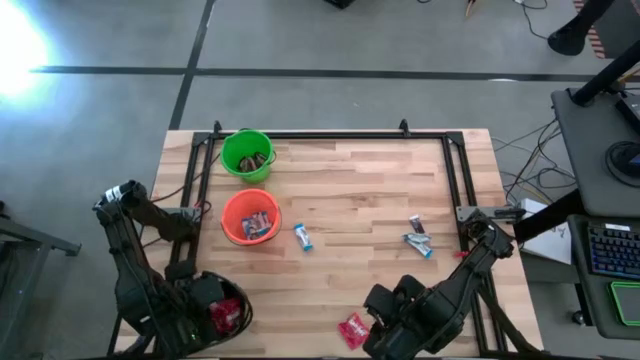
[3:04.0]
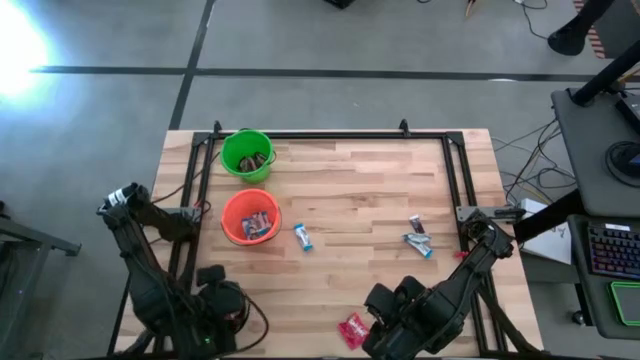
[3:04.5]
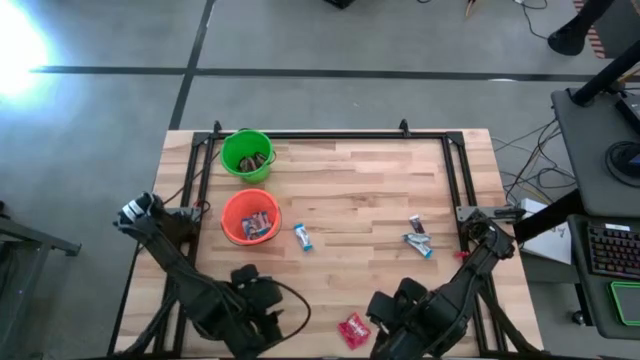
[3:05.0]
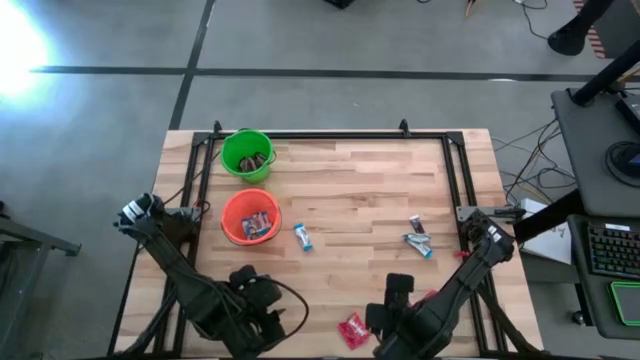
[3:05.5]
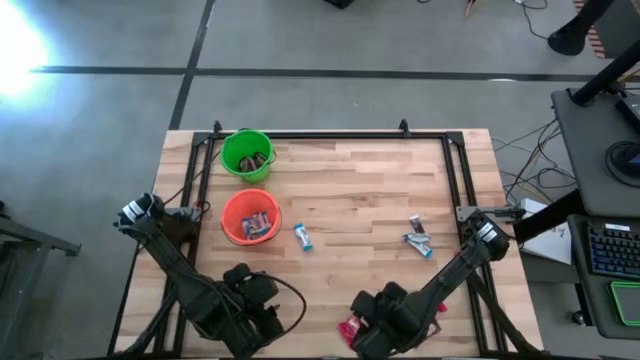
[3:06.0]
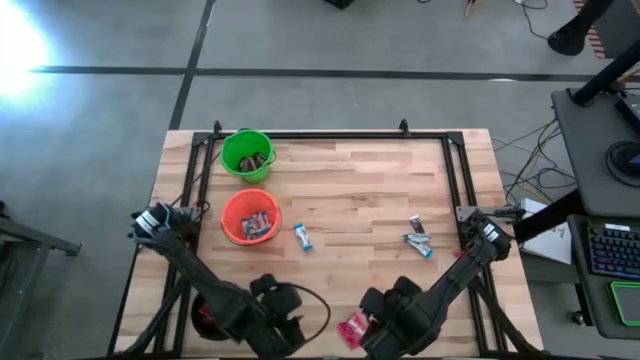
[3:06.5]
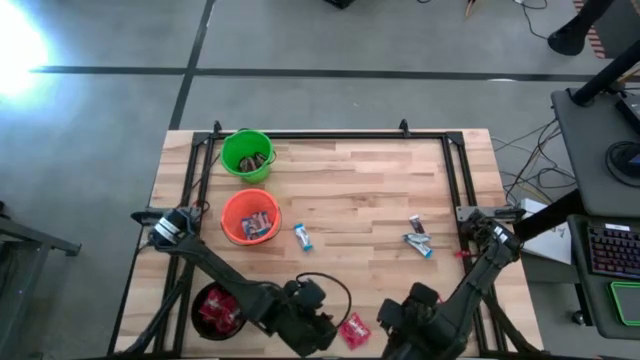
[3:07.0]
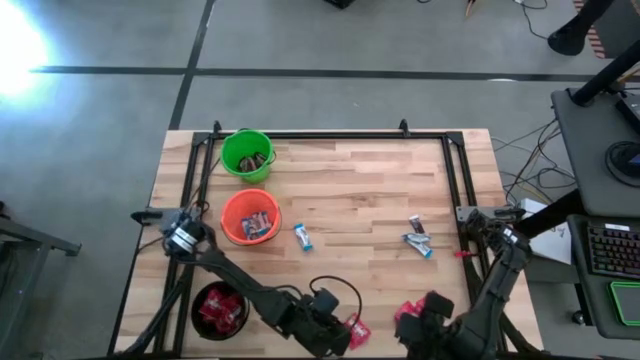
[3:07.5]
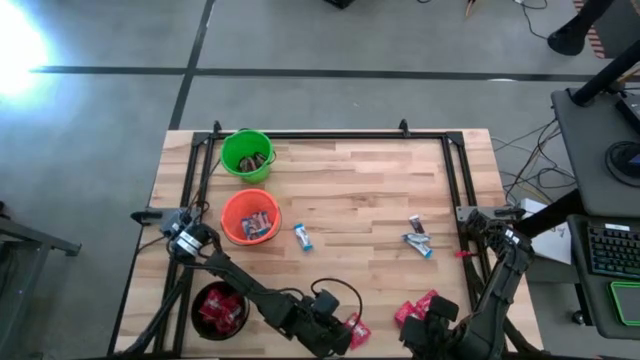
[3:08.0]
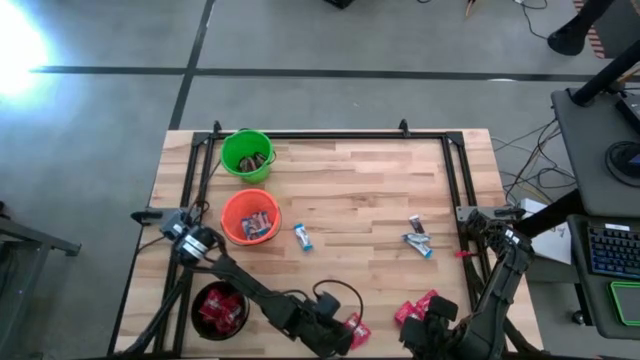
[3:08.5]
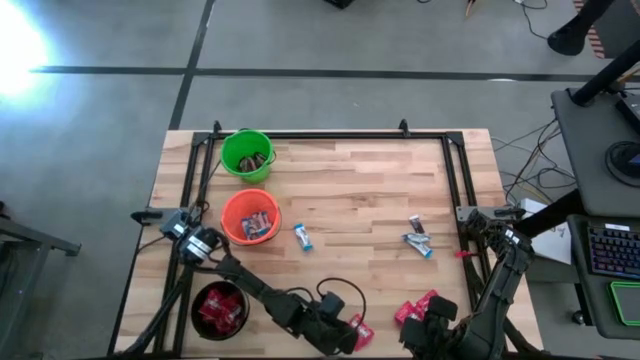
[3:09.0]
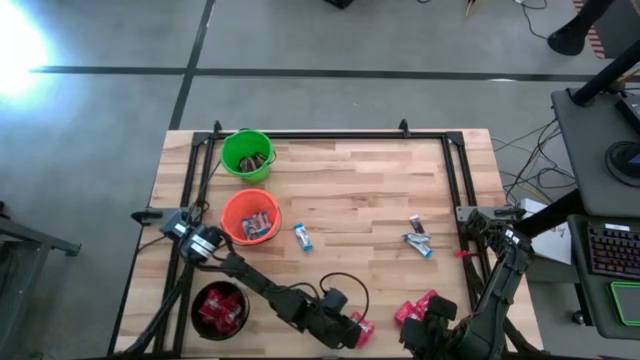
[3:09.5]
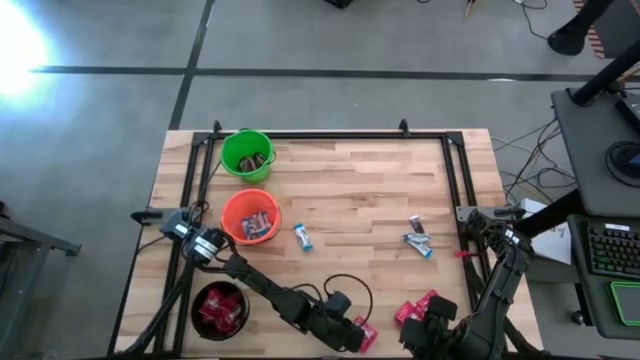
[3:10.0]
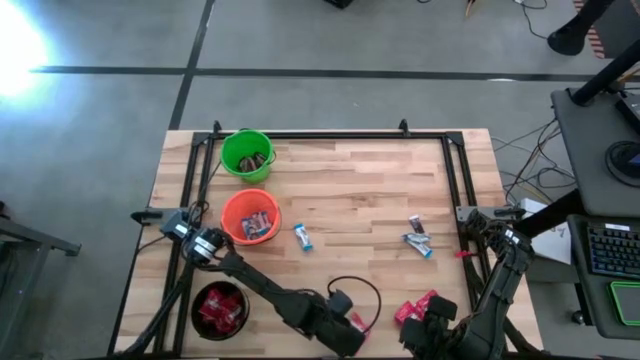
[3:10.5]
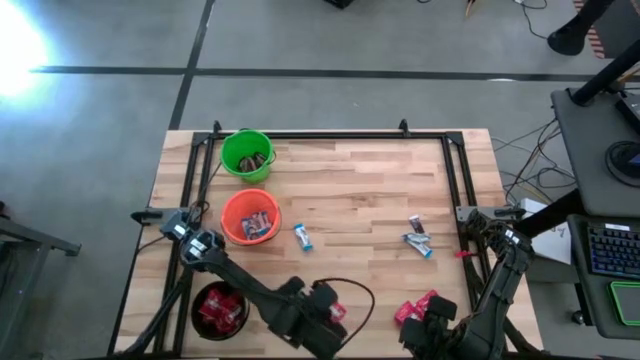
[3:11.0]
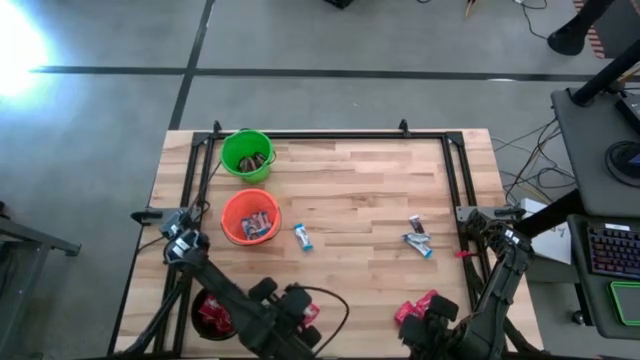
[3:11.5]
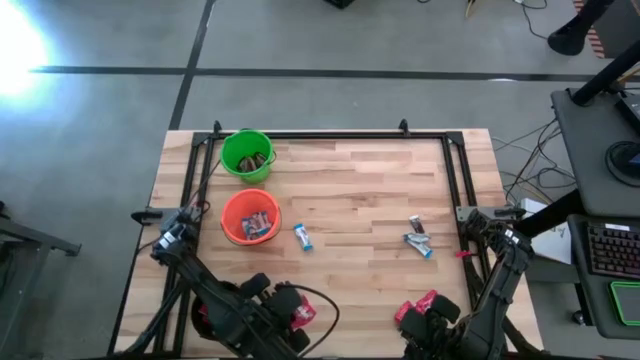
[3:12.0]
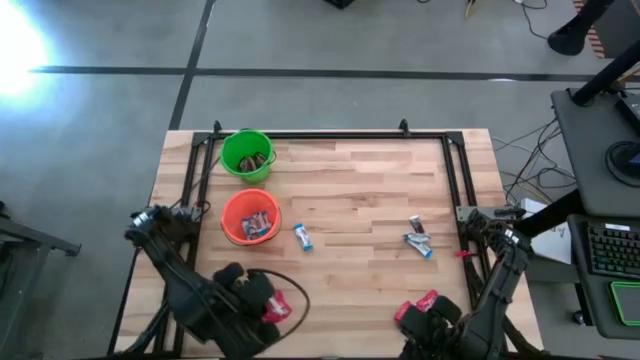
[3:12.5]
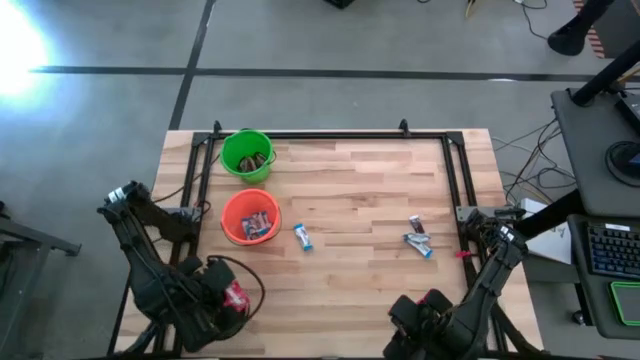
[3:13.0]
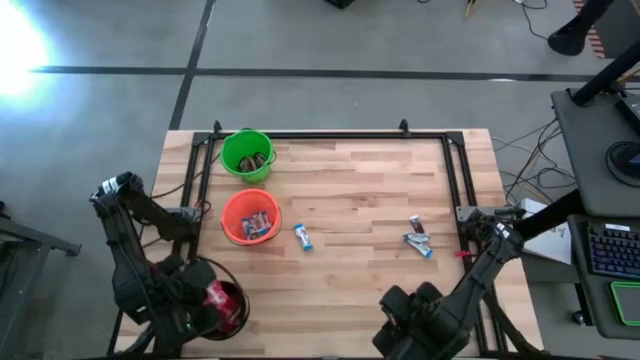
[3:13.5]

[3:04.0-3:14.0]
Task: Organize candy in baskets
Put the red candy into the black bucket

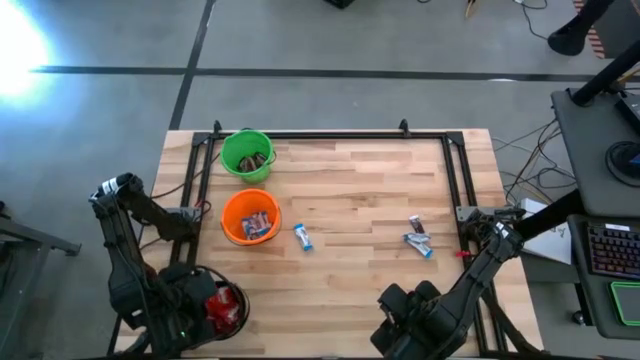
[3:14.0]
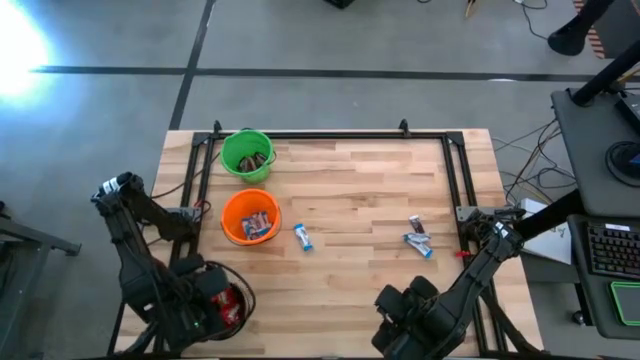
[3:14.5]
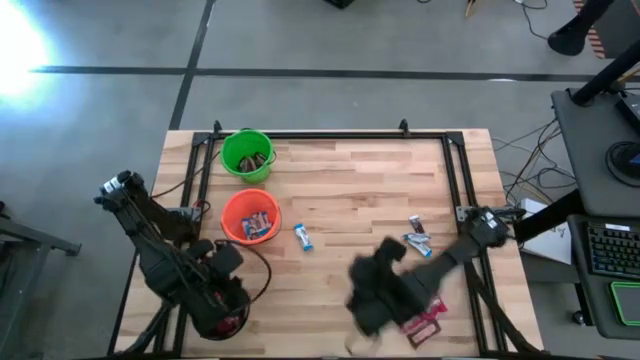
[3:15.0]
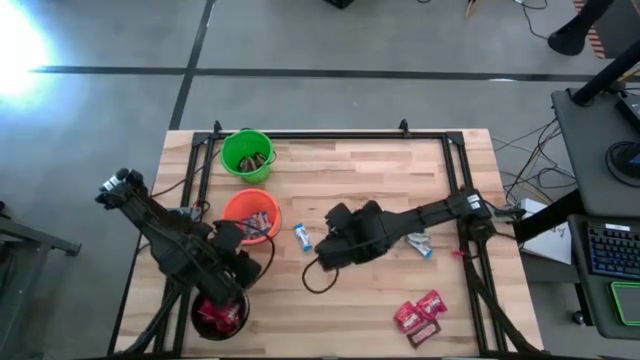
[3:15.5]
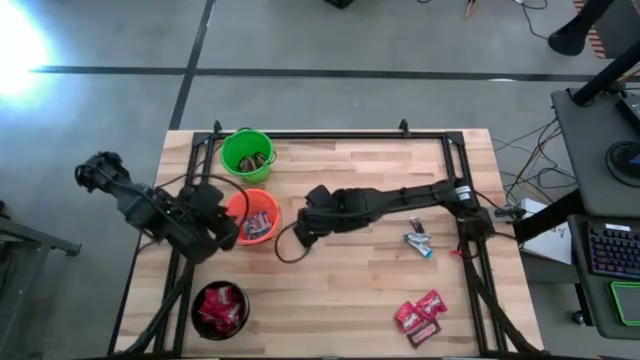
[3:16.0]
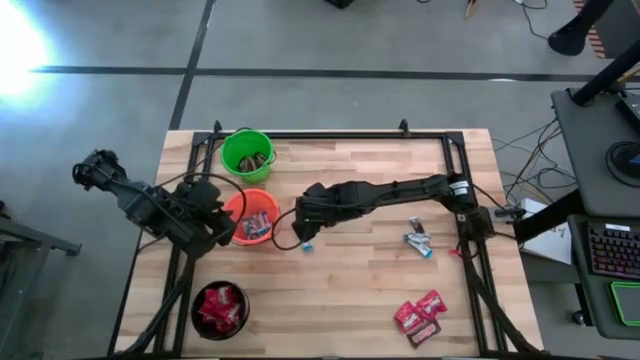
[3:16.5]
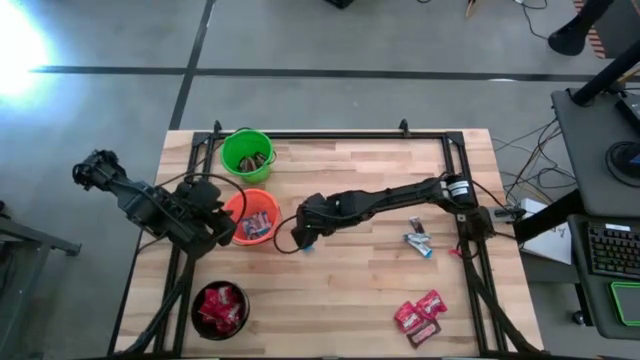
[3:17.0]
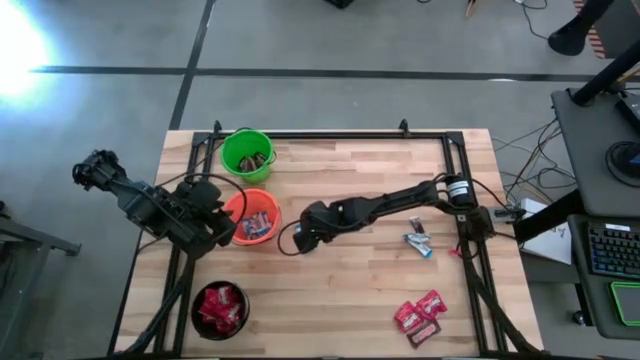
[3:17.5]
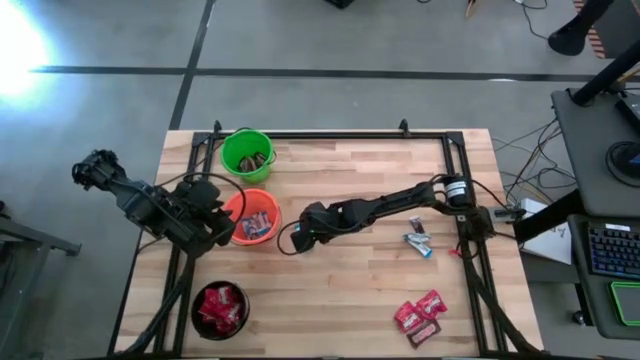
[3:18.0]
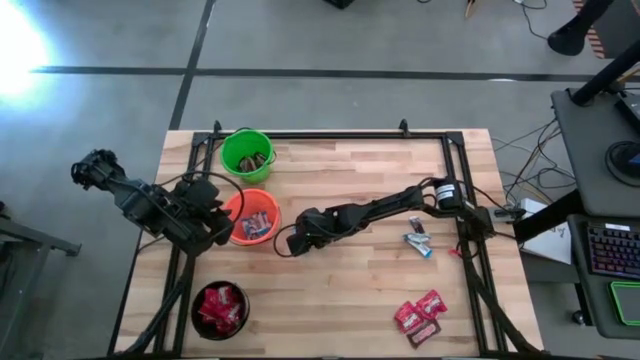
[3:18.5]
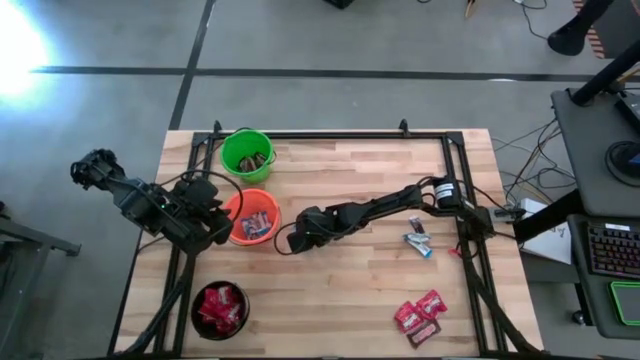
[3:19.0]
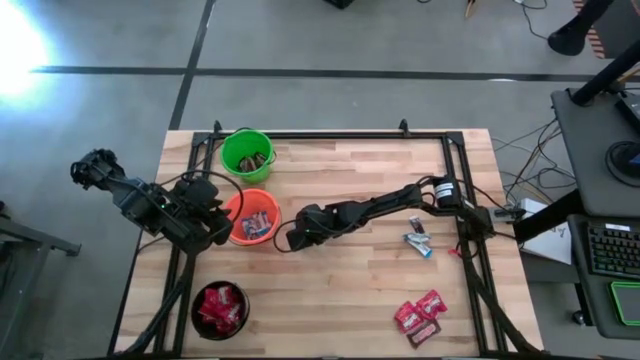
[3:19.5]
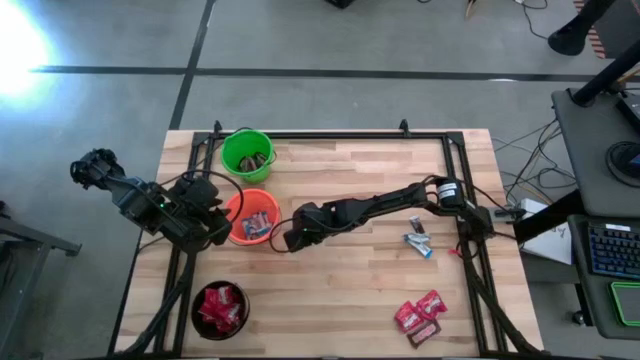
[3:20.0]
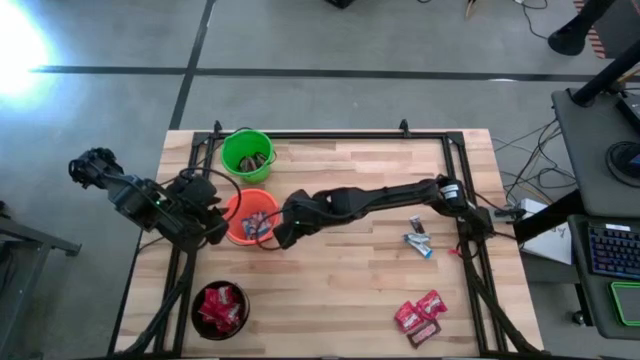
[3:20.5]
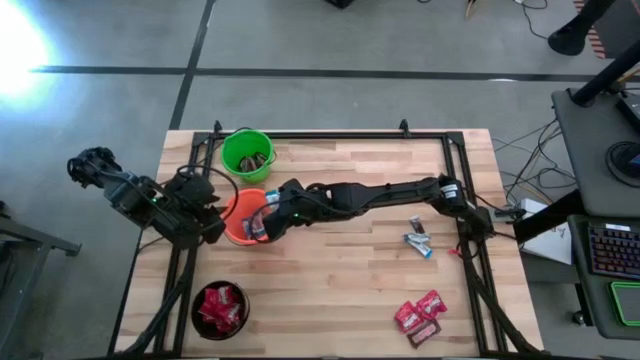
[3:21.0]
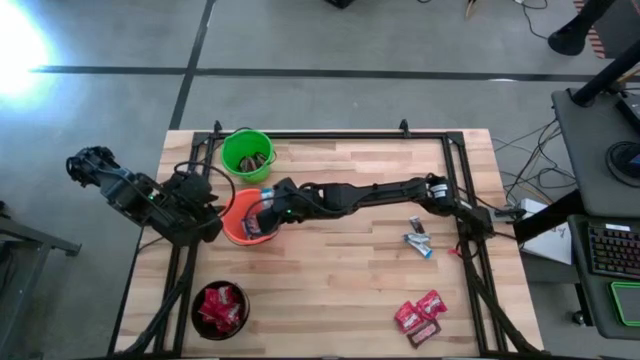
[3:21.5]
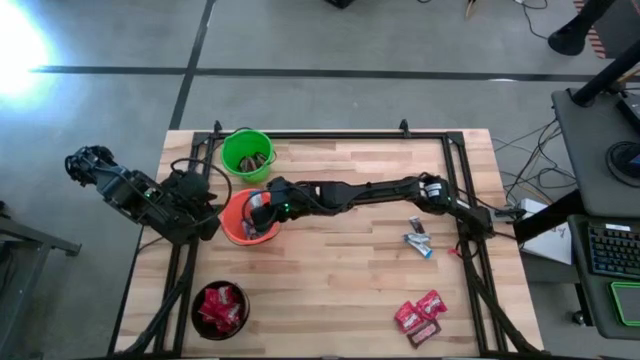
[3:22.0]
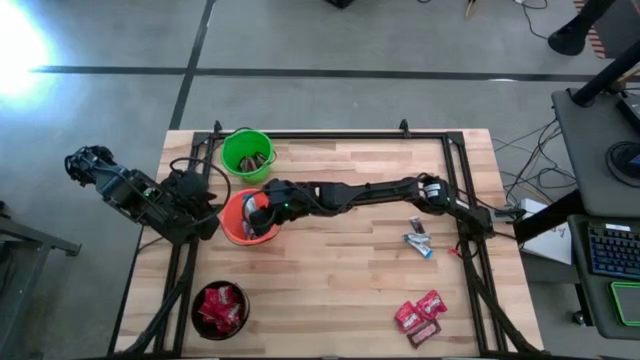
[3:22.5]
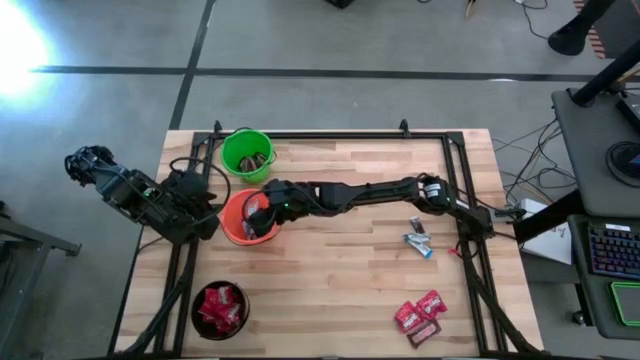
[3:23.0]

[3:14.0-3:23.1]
Put the white chocolate into the orange bucket
